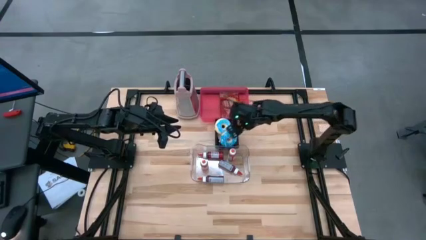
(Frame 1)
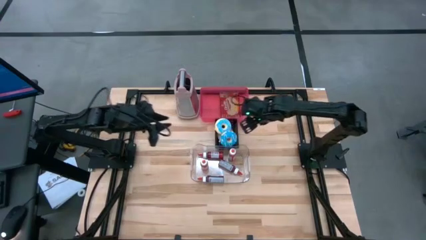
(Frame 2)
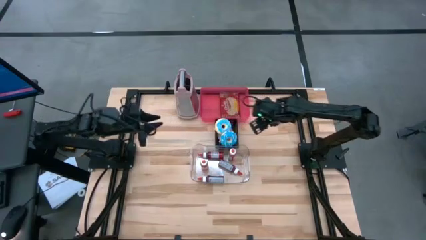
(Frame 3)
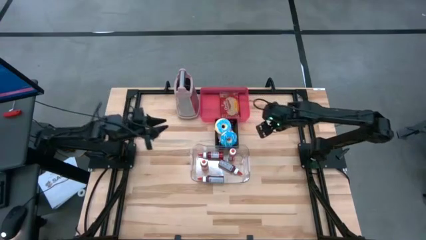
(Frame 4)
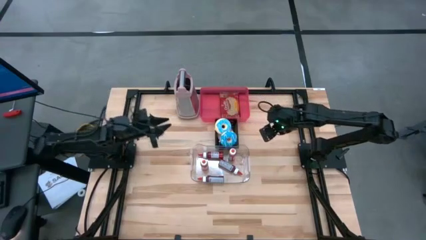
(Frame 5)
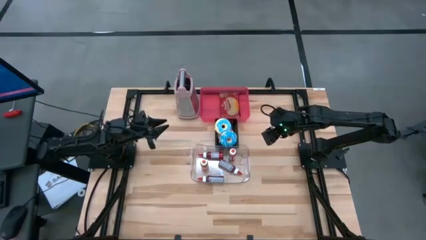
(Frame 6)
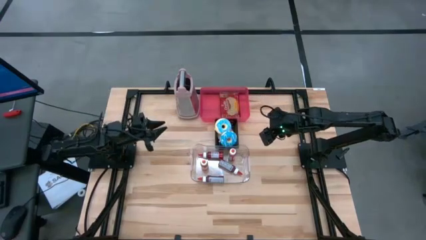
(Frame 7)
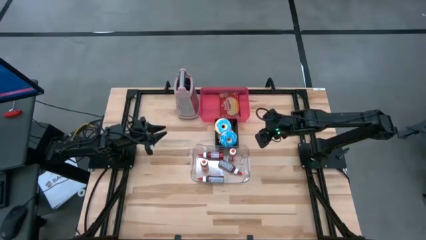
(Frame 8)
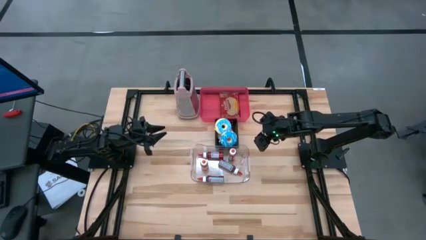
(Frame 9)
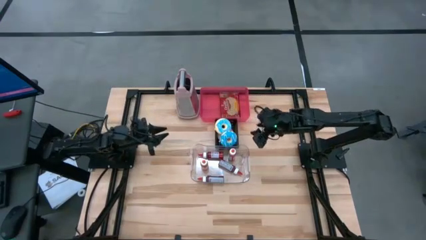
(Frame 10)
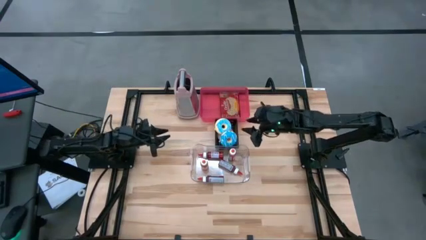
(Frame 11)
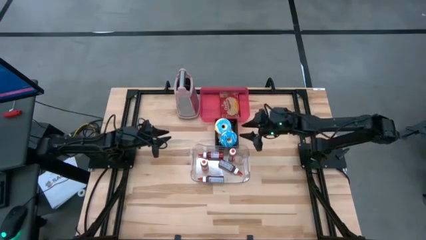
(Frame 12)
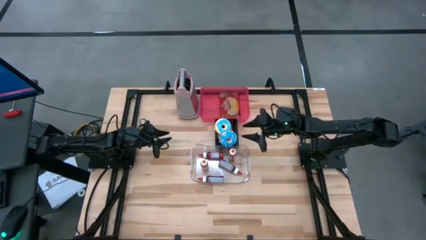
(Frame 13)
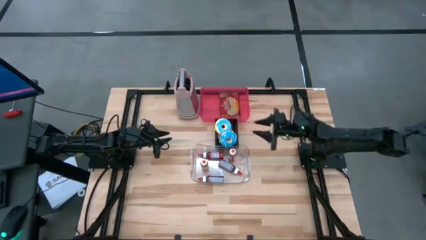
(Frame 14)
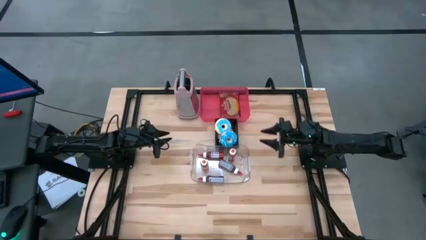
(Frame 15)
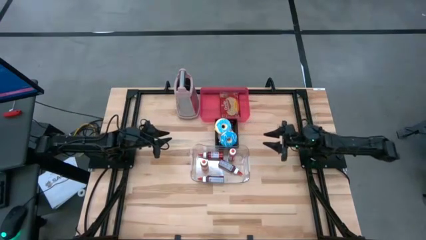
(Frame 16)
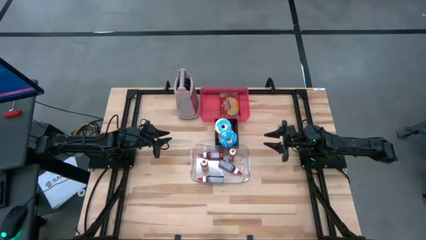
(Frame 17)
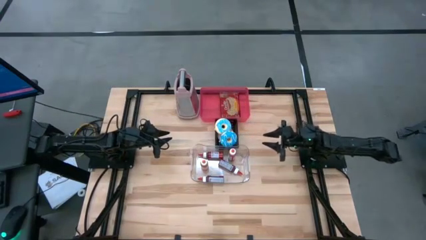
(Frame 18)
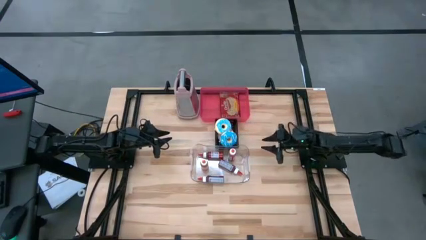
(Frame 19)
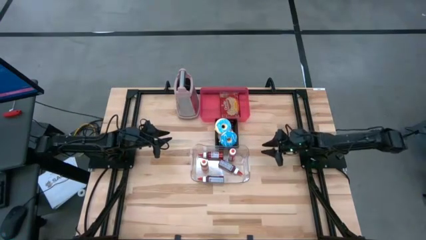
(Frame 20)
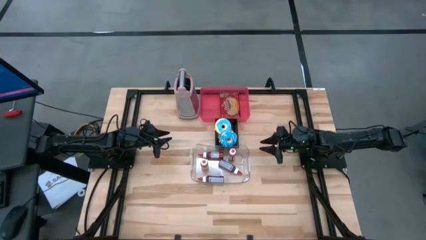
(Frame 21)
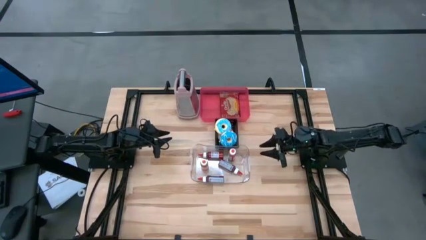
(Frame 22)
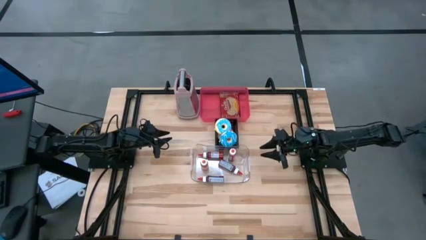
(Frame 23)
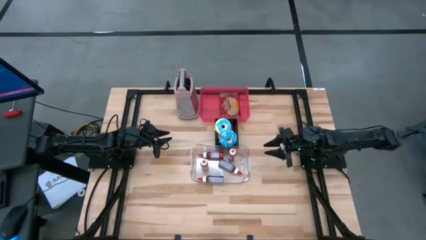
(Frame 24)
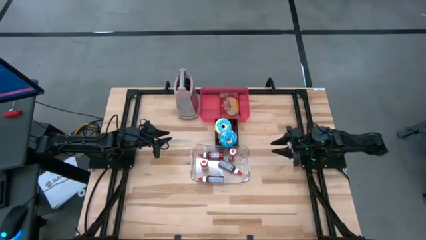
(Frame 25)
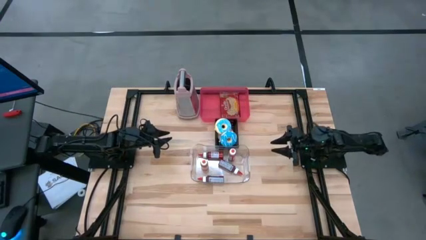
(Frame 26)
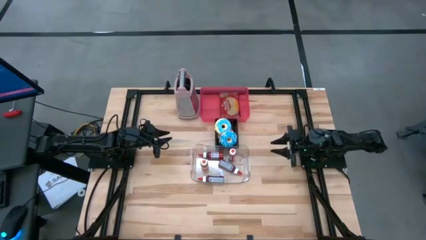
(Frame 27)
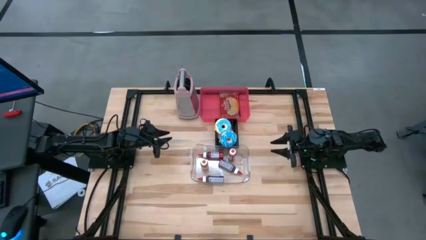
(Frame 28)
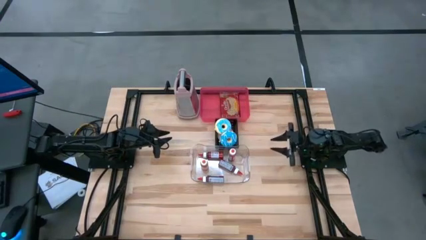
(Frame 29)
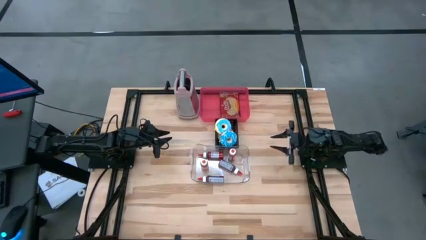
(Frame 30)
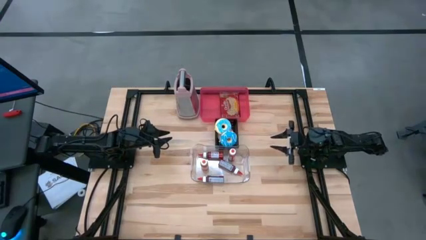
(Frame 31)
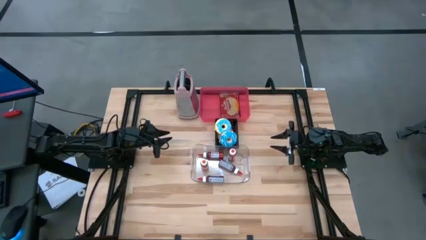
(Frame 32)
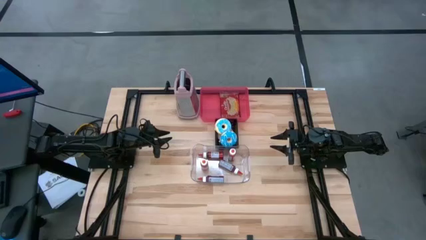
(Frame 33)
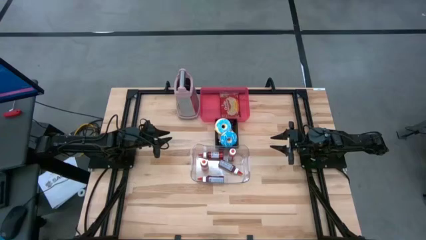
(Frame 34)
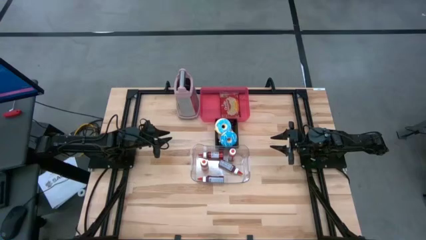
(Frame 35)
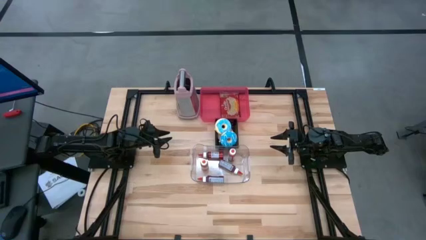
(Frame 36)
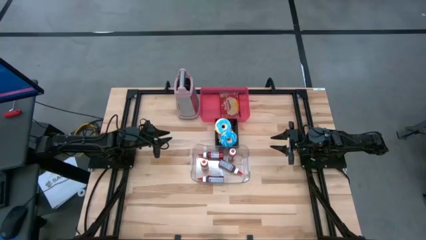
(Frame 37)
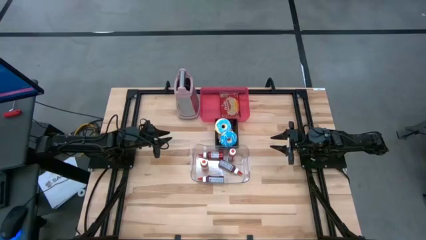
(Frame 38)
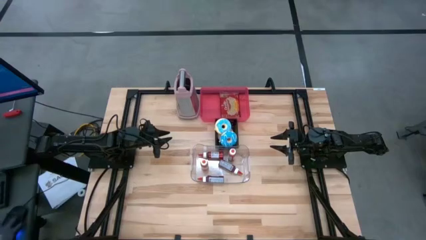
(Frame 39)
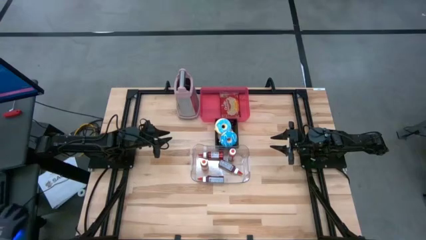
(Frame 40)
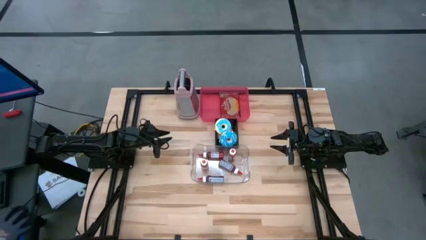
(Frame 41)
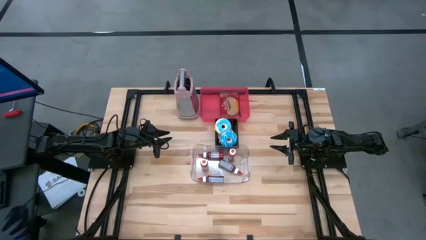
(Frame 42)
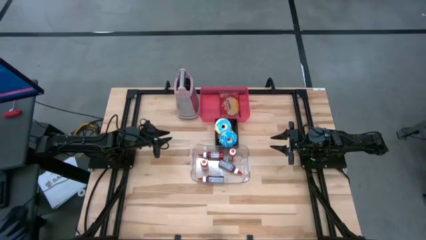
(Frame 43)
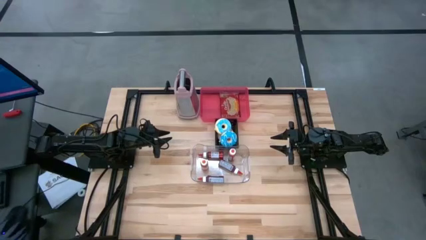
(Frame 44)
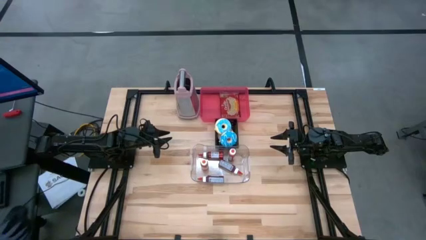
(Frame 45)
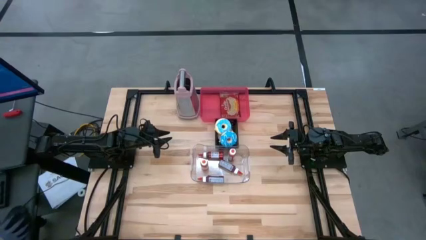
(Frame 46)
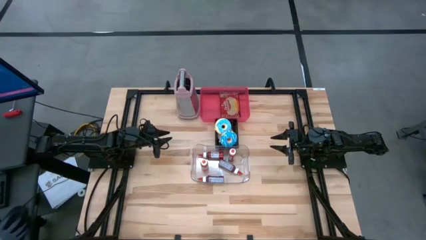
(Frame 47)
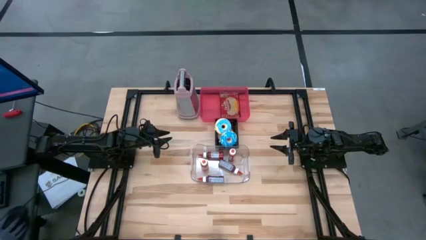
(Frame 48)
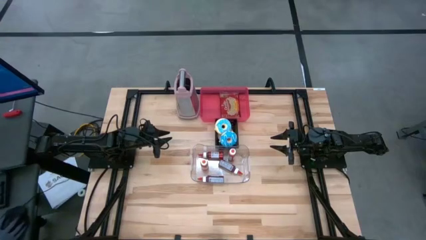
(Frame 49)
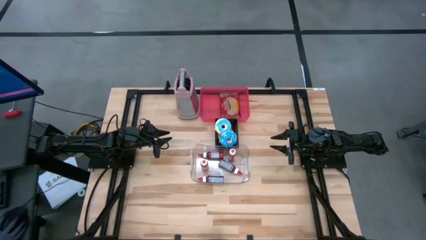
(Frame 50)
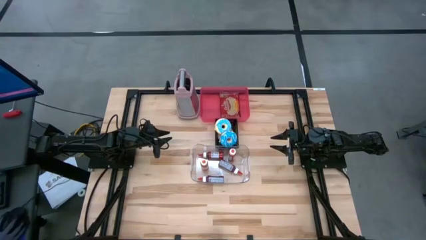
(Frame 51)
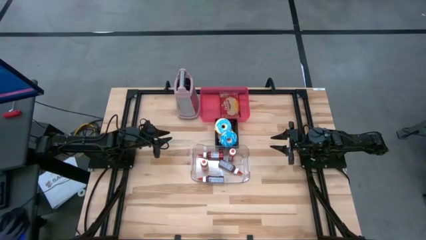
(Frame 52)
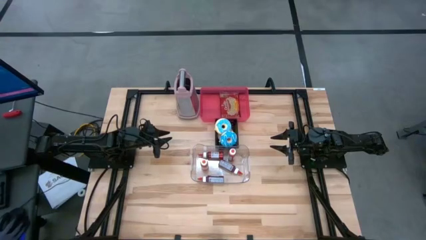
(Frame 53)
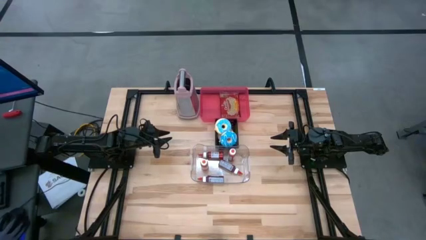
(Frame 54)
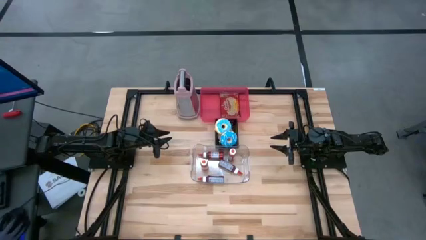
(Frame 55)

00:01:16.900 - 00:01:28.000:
Task: Pick & Place Food Item
Return to Home Position
